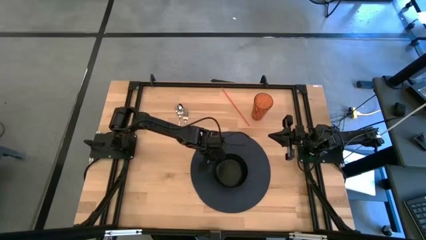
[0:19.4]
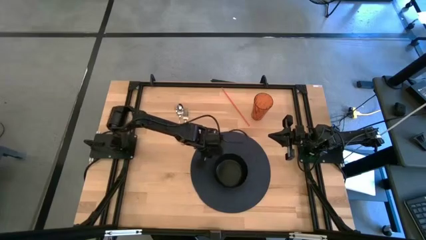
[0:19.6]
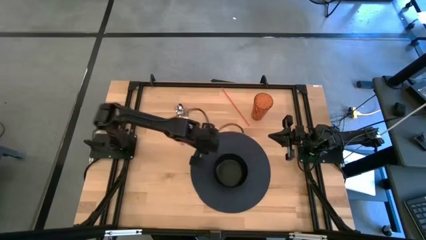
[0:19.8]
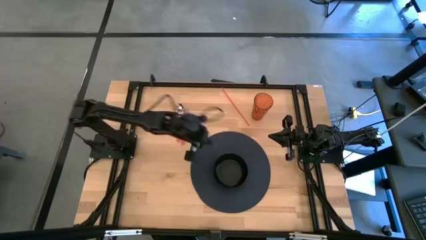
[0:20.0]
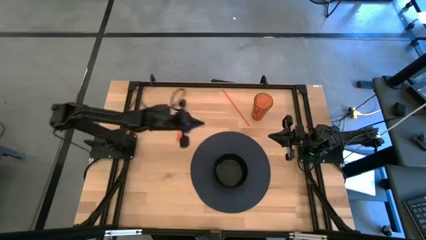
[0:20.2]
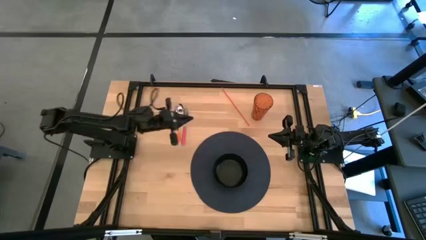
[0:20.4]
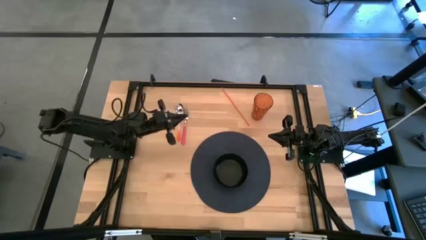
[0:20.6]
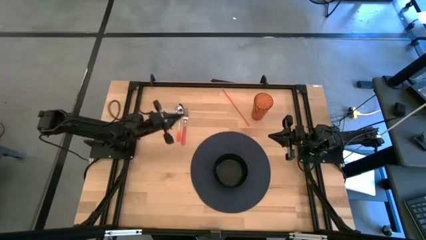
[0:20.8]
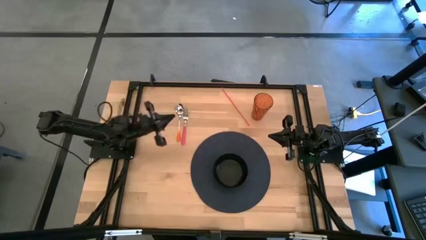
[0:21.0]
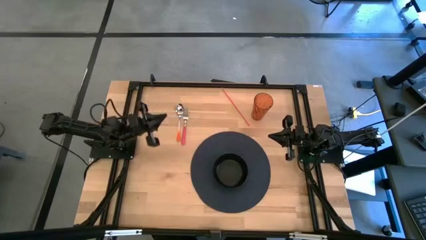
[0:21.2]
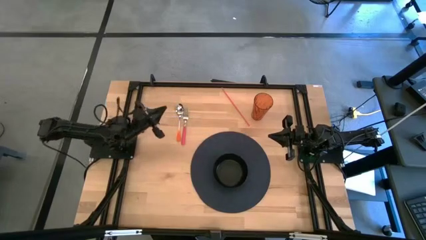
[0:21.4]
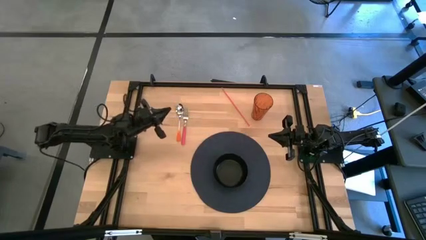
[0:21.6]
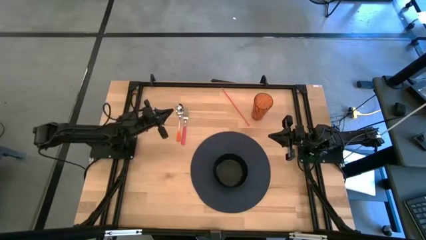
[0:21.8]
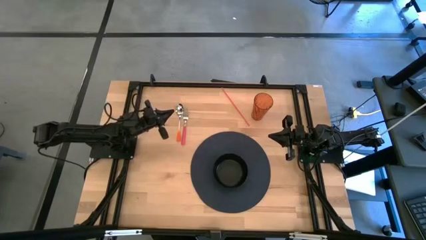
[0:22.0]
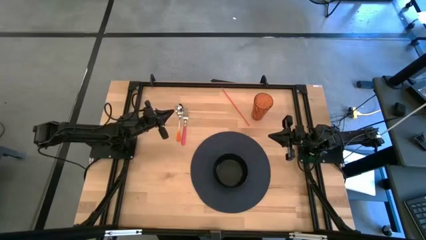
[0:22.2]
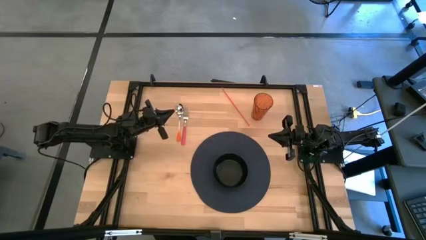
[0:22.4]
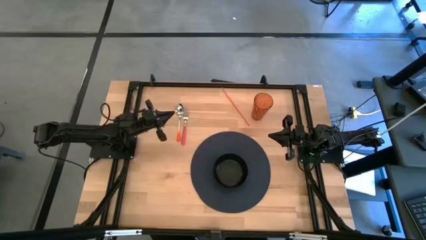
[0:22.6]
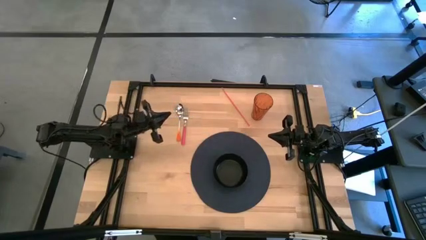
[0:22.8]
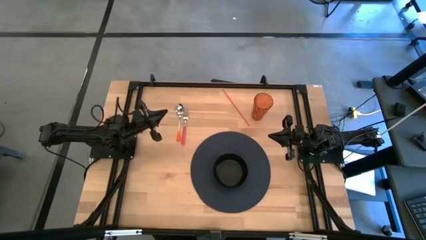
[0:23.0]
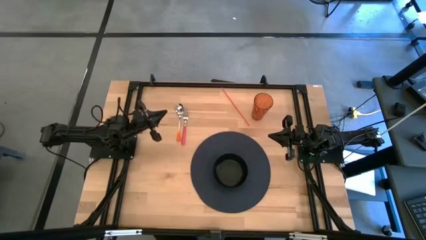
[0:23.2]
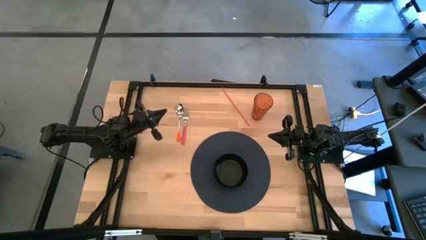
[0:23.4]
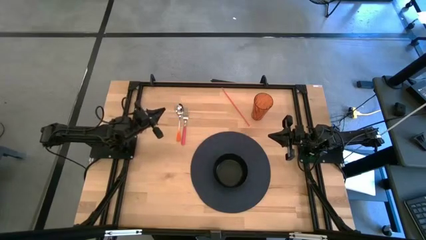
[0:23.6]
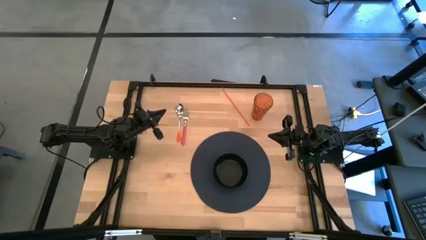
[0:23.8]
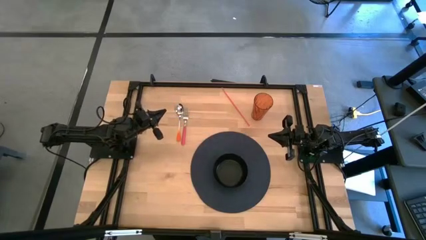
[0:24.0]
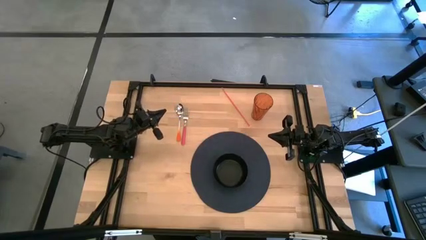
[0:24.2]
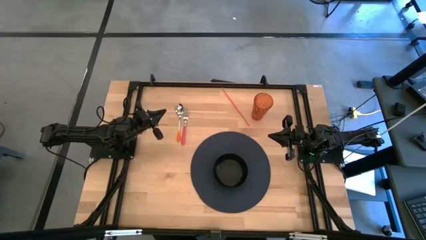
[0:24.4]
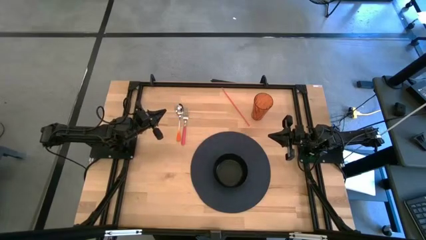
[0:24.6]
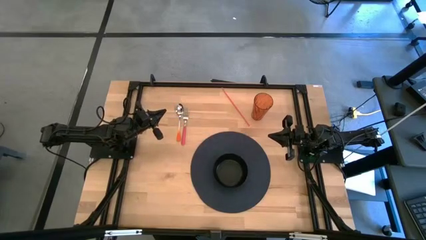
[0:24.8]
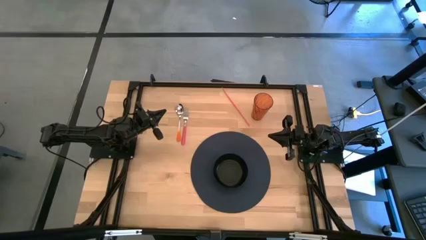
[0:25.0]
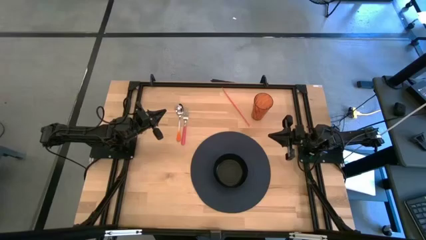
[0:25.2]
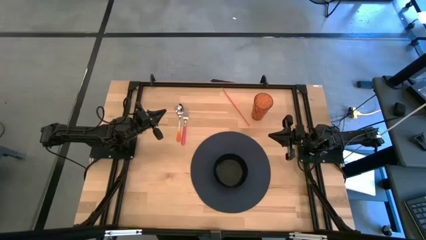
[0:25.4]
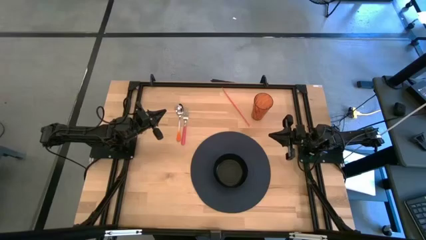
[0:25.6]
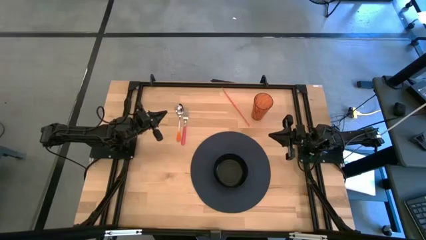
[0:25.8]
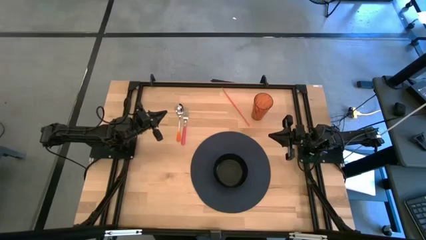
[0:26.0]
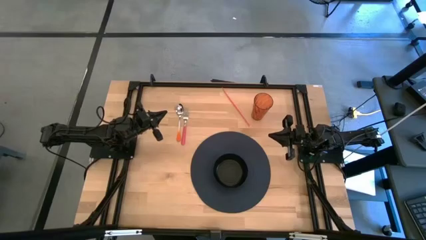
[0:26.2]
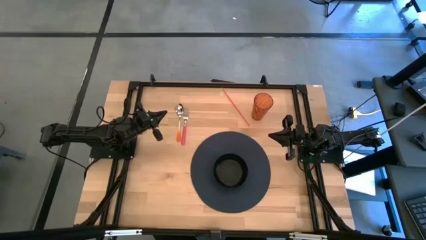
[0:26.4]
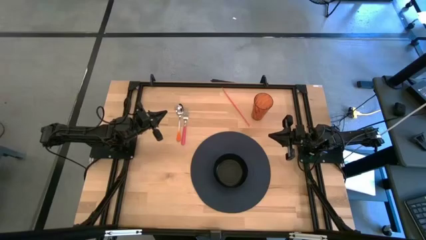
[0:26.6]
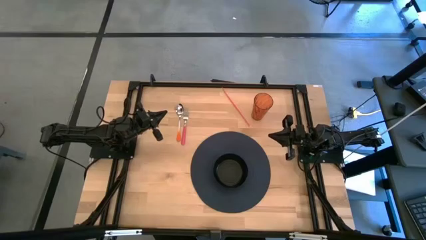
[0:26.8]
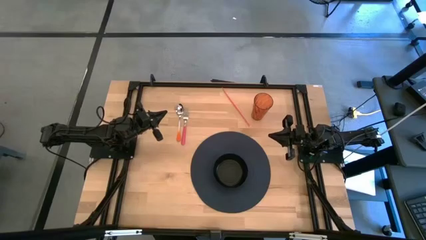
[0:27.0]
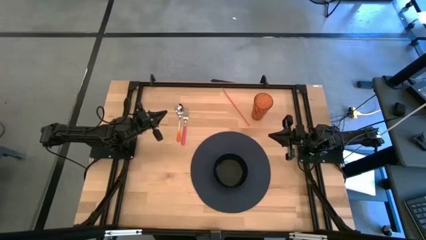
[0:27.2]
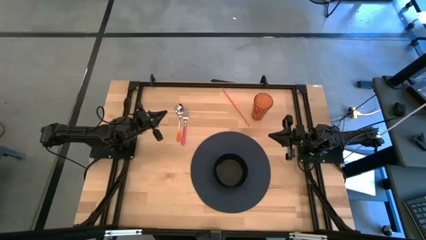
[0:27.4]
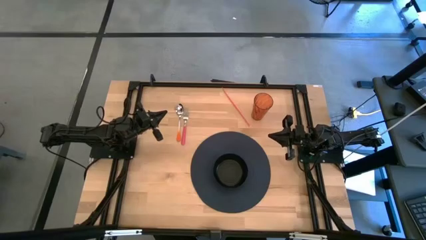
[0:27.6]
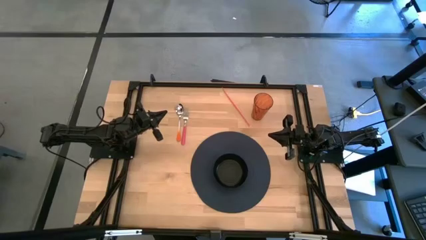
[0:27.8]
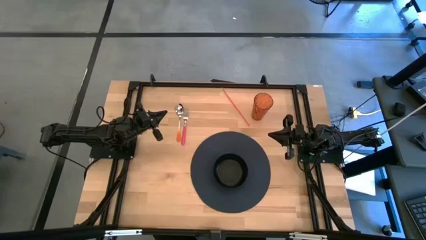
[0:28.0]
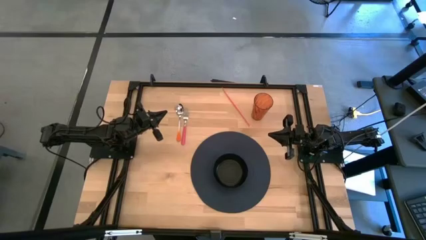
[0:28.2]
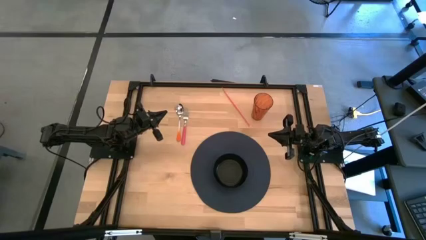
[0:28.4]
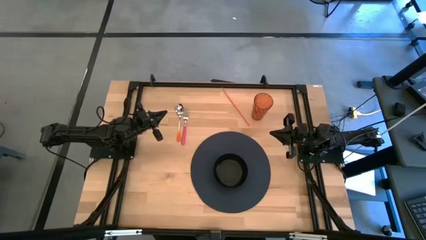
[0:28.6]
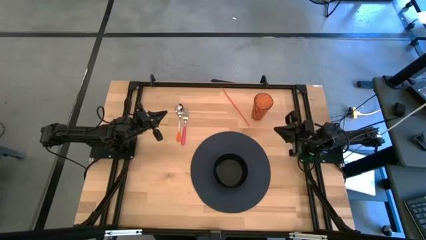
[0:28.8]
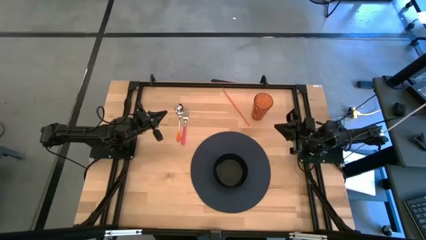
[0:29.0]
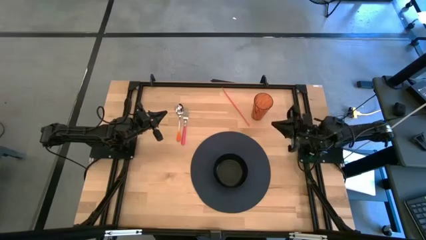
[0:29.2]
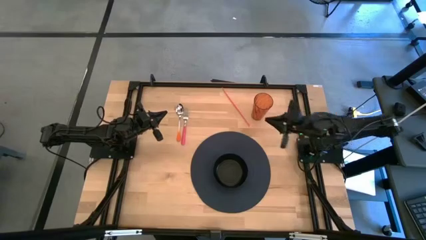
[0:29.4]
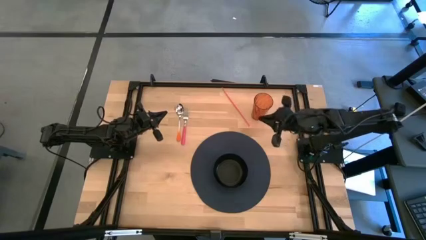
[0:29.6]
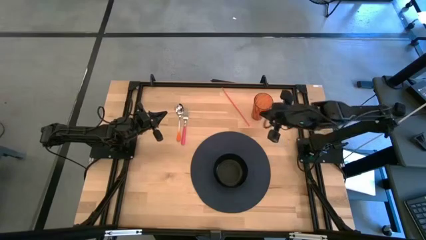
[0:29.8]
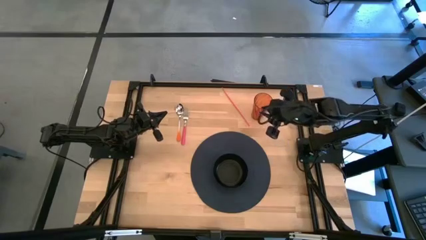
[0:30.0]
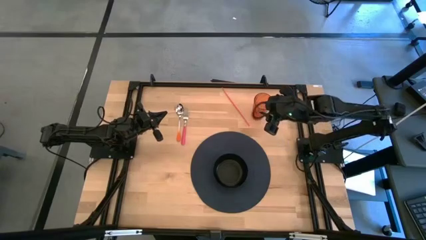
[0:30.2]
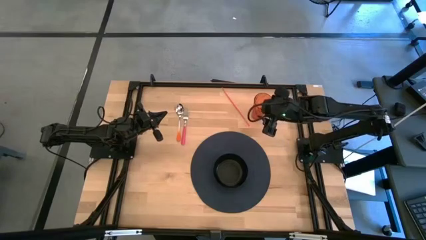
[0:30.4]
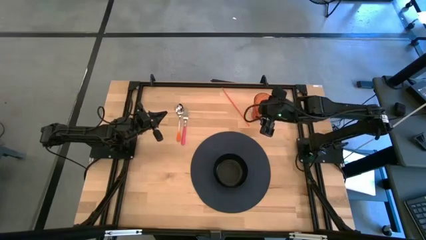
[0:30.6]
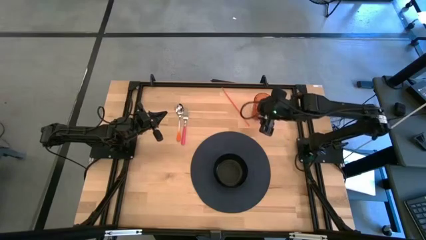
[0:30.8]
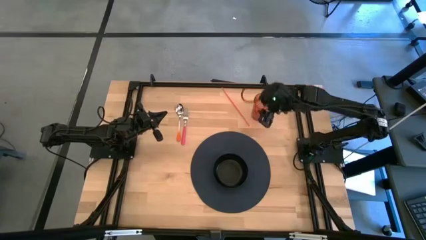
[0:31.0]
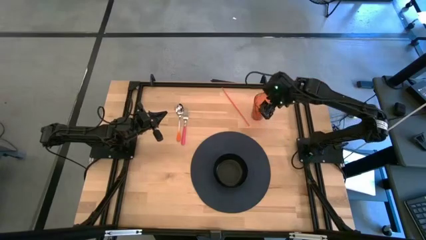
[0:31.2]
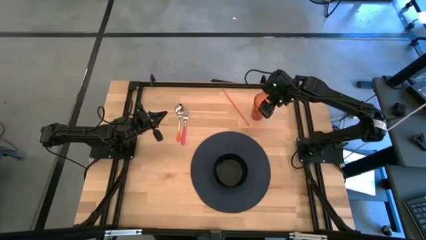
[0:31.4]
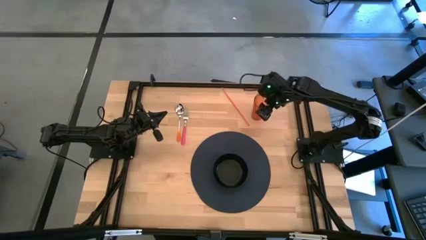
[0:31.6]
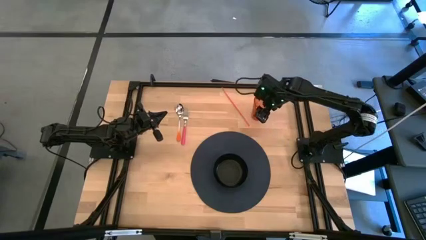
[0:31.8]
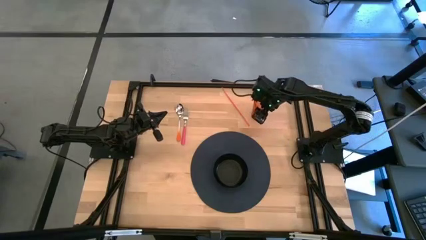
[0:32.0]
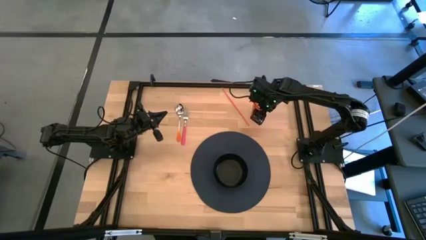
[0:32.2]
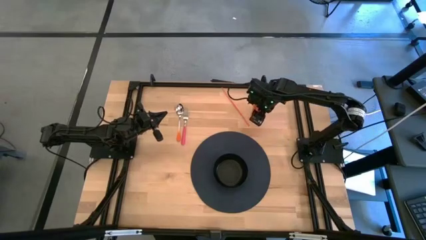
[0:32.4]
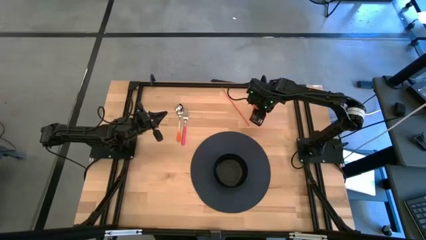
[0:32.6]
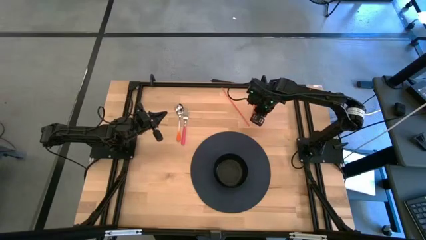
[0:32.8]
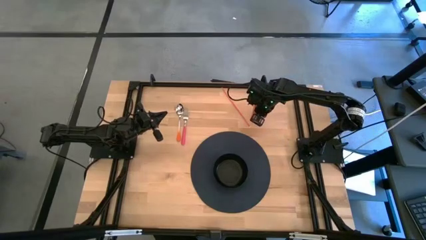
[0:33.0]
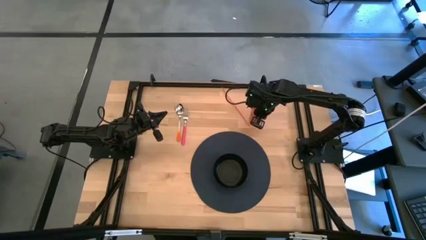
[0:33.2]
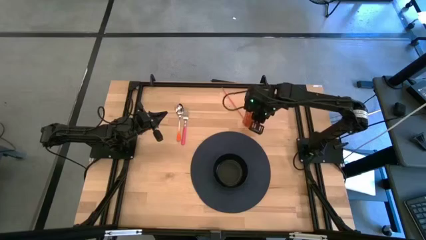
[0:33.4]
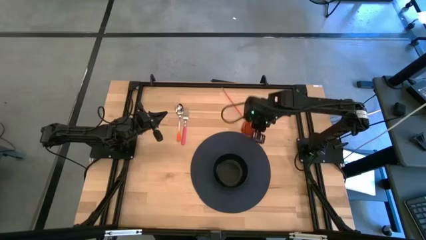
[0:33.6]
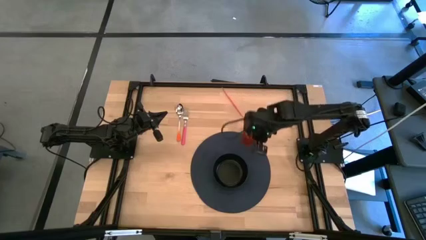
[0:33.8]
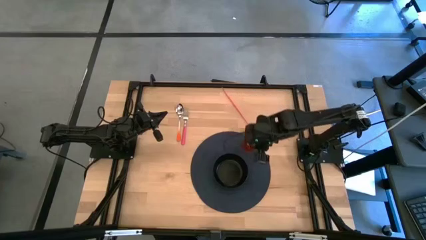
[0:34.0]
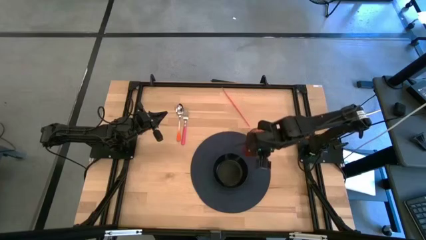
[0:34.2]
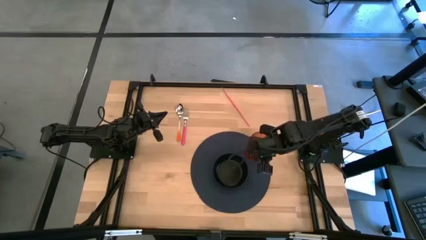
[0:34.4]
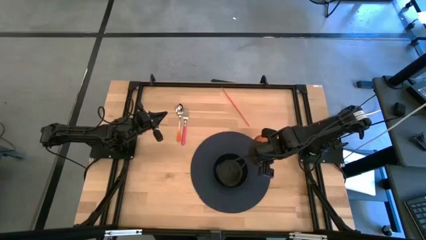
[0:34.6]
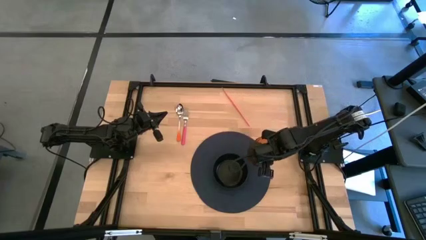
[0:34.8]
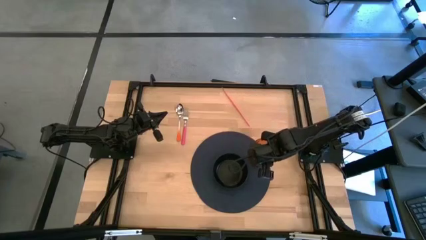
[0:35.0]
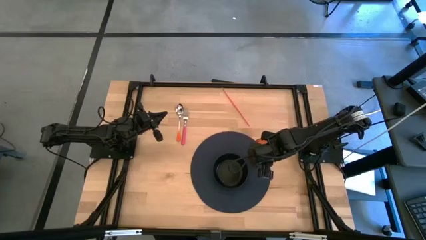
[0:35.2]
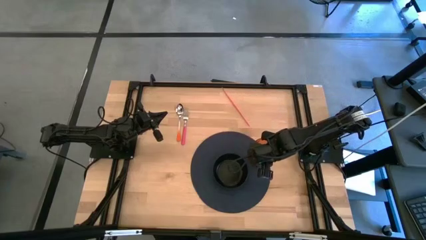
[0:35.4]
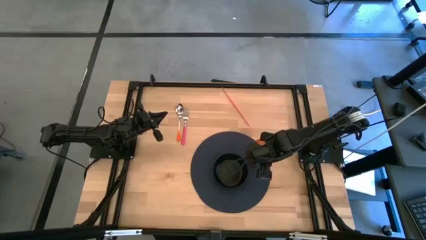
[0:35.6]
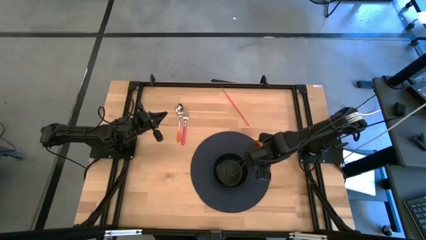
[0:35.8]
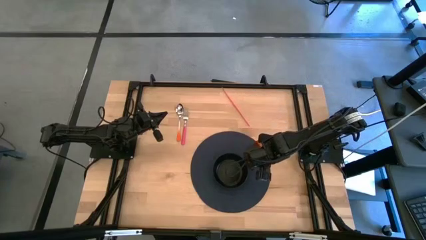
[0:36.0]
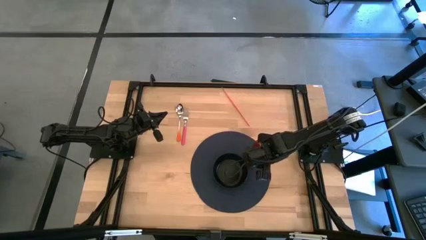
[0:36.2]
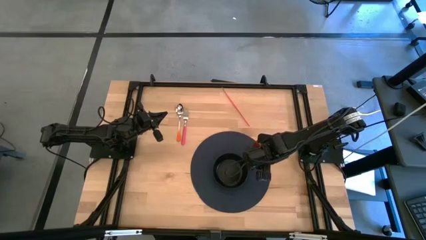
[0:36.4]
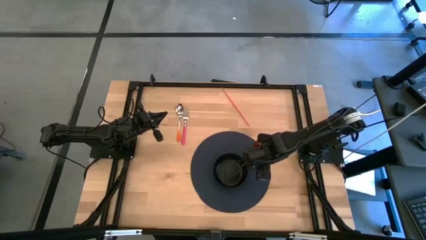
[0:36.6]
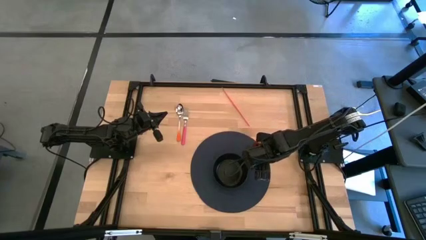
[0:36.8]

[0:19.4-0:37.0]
Task: Pick & Place Utensil
Put the red cup on the blue mat to the top right of the black bowl
